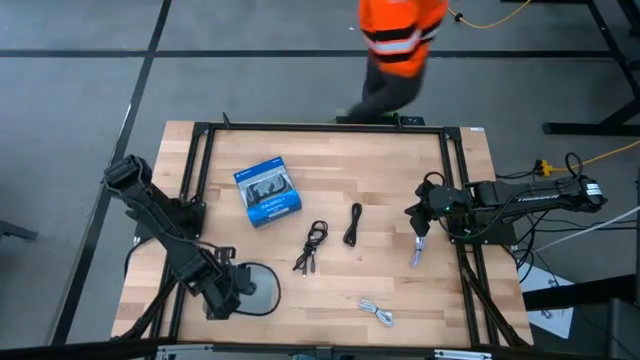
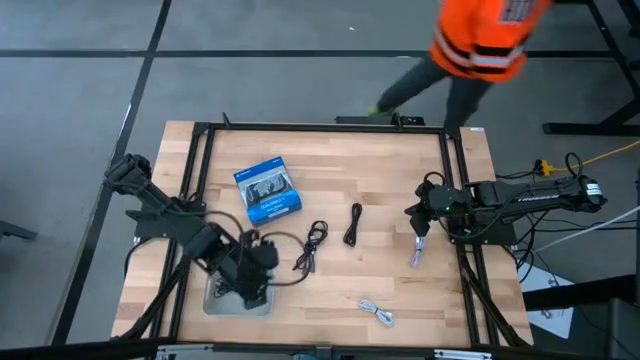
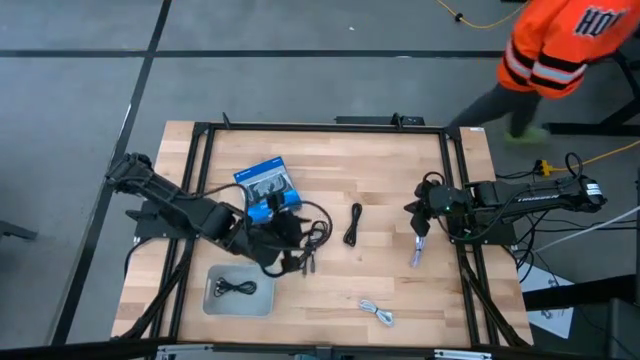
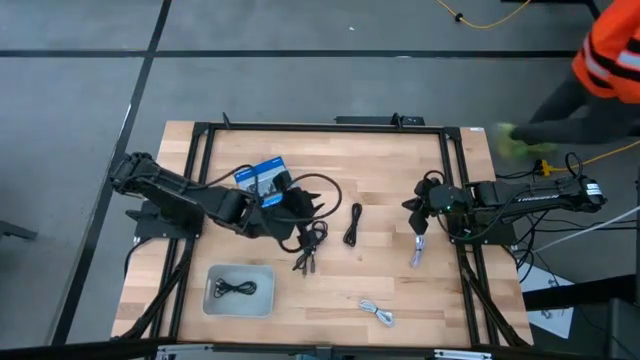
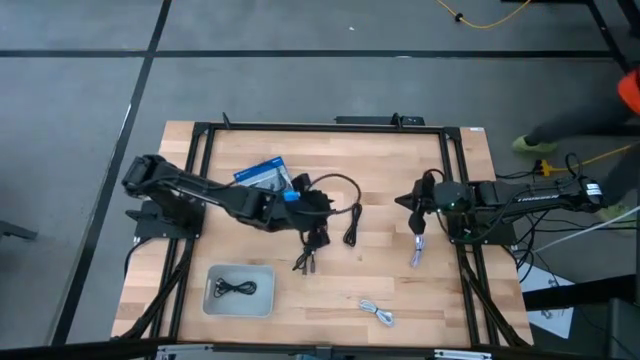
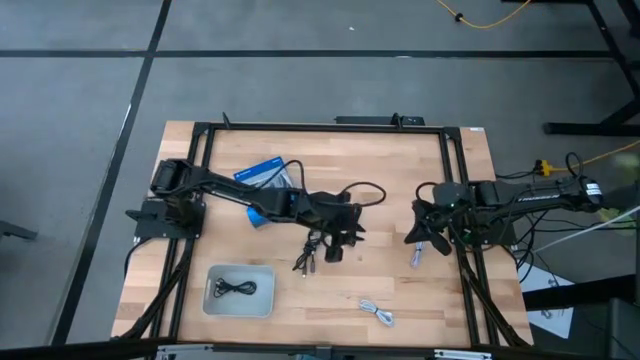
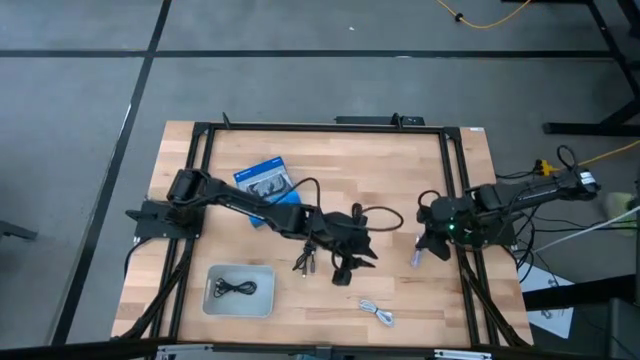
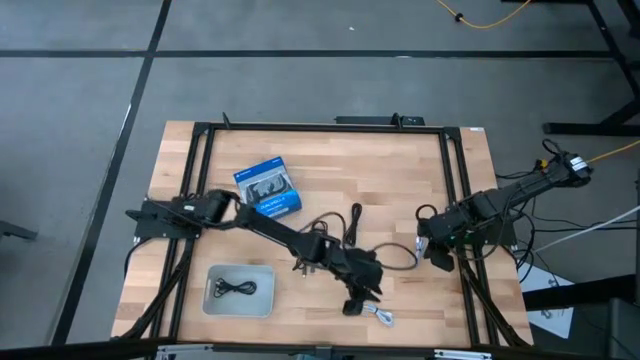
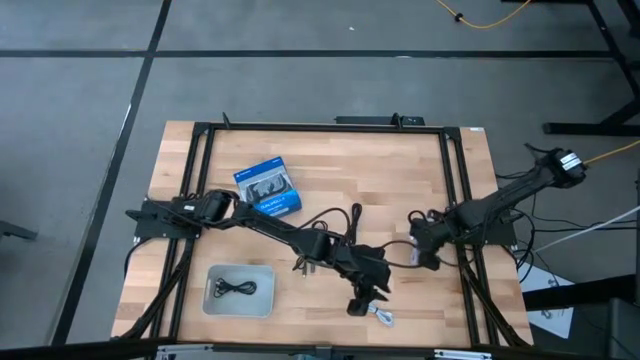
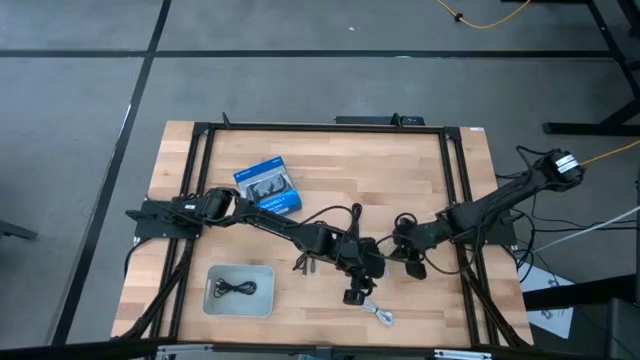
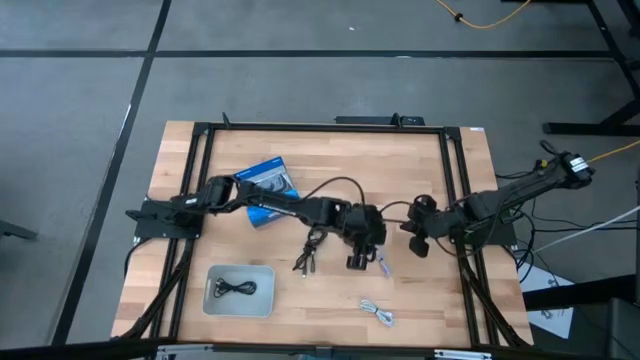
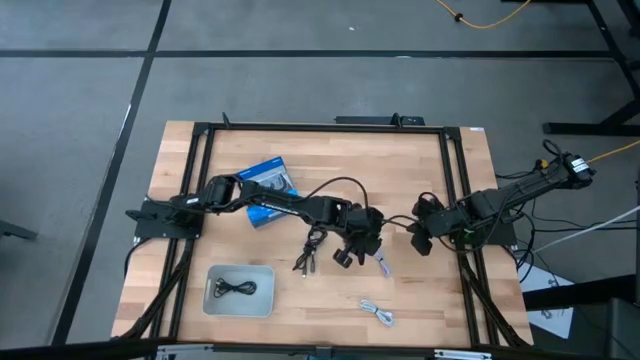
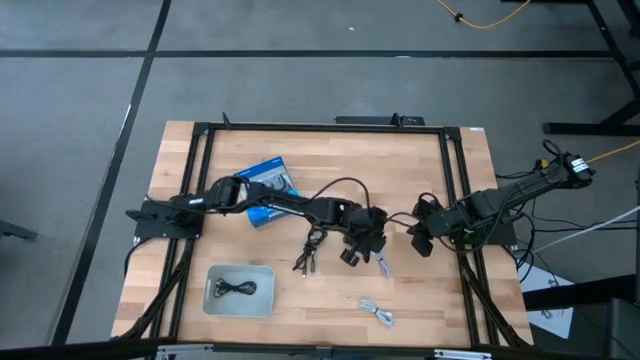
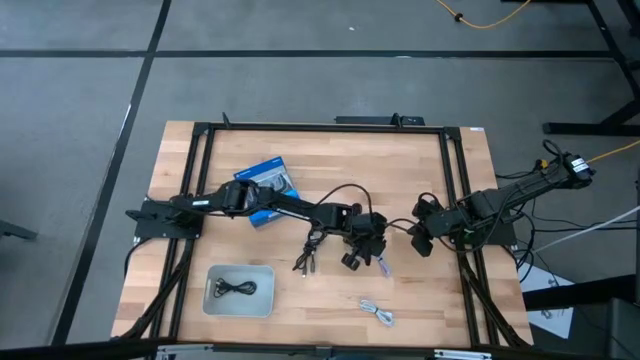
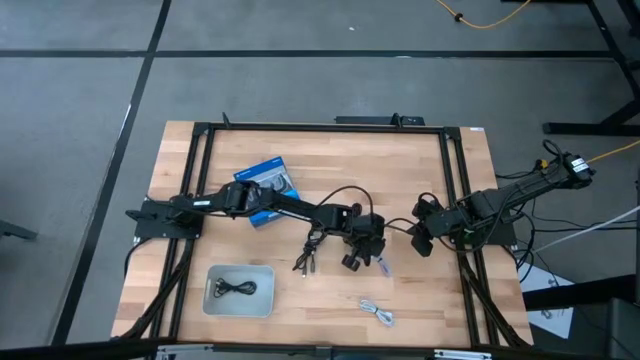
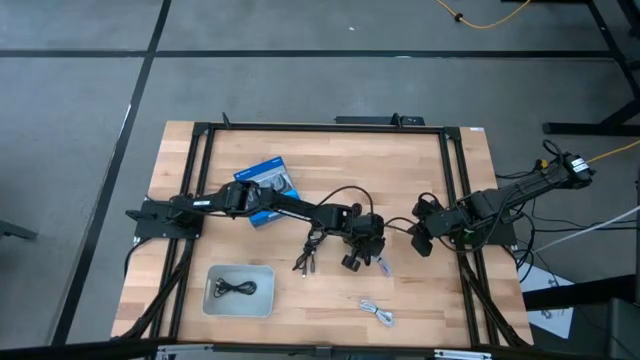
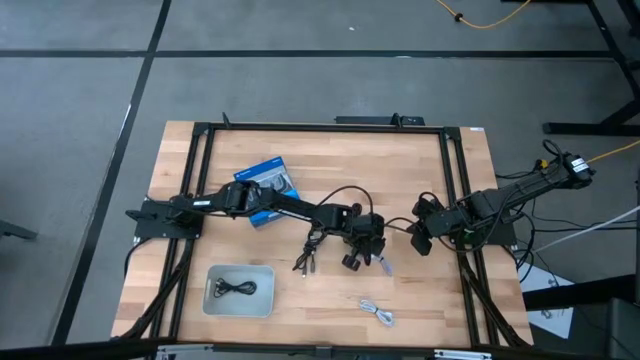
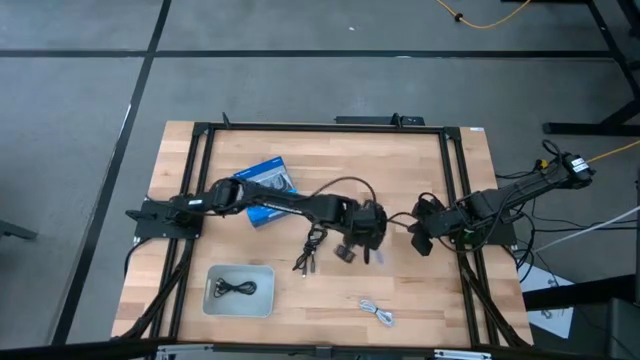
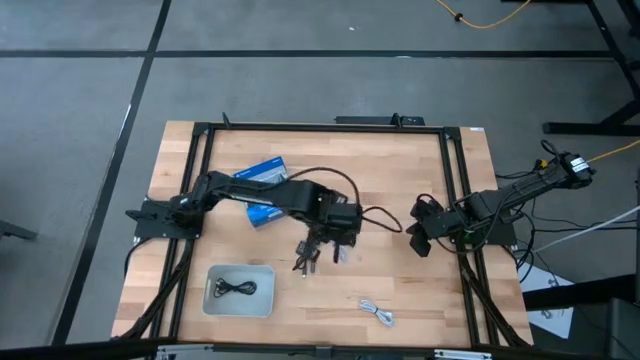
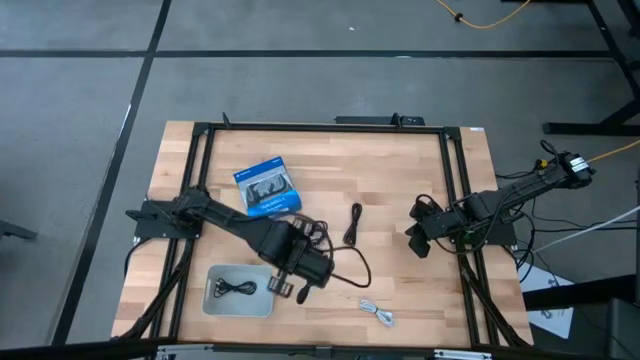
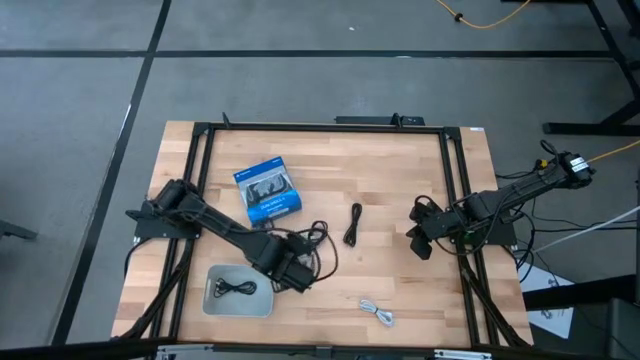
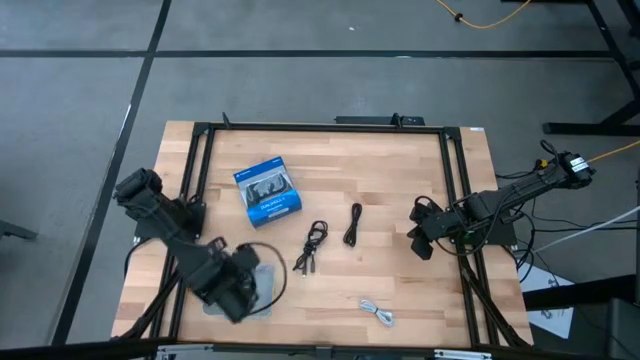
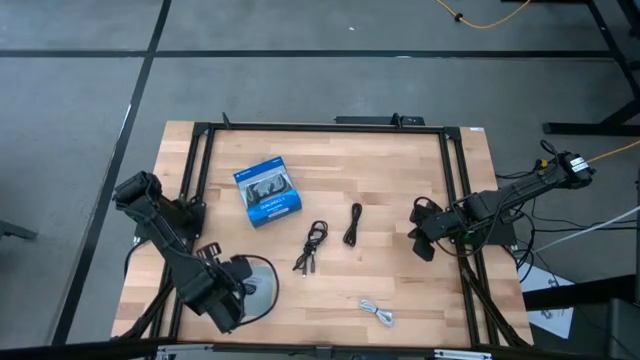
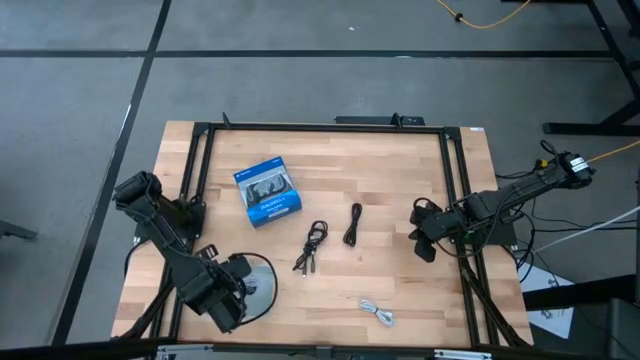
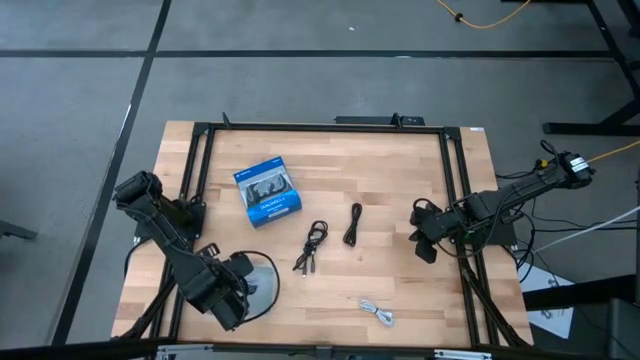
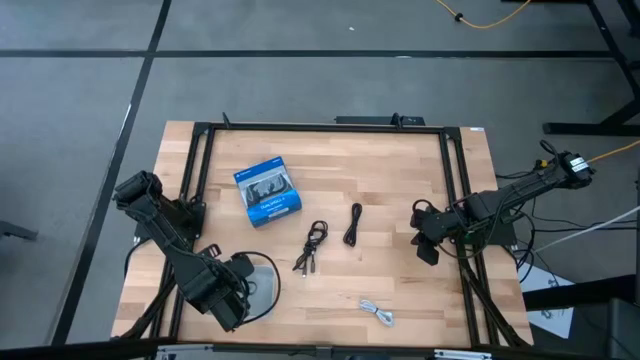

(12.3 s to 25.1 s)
Task: Pick and place USB-C Cables
Put the purple usb cable into the white bin

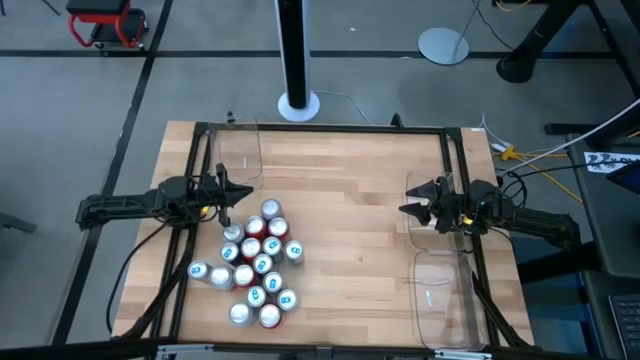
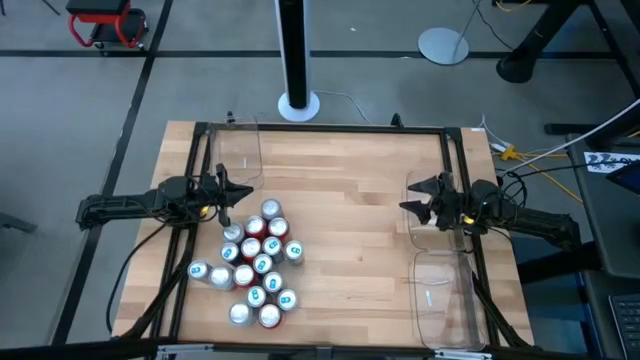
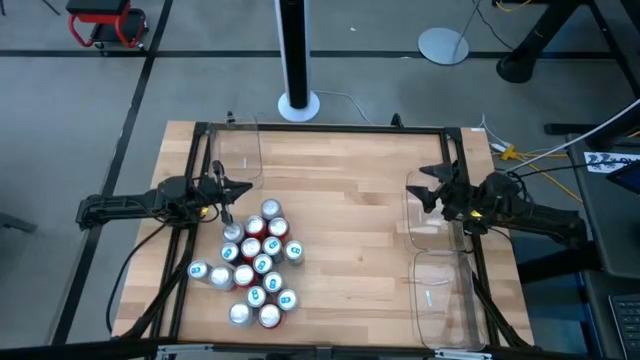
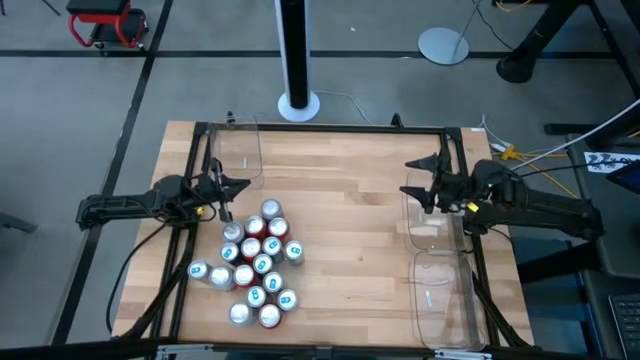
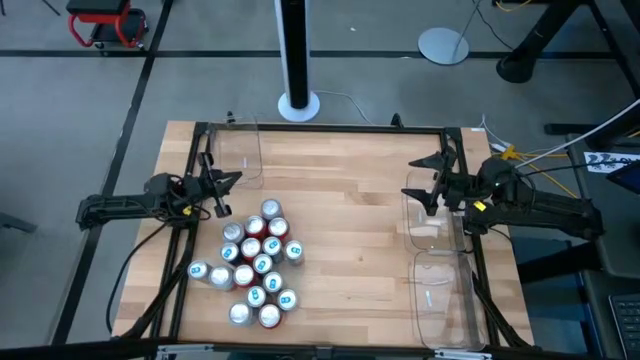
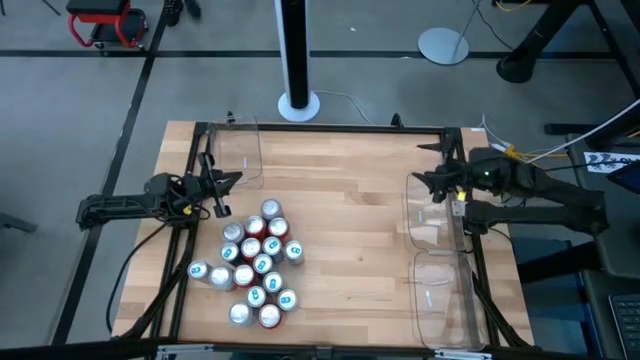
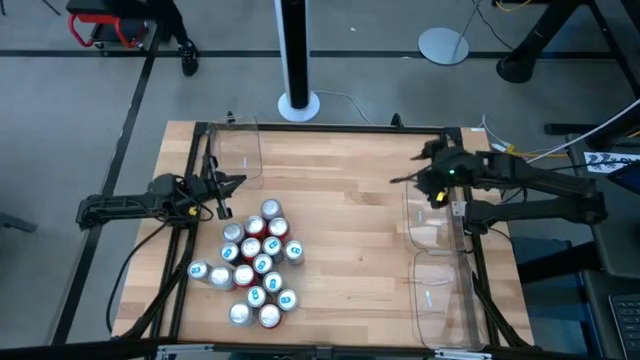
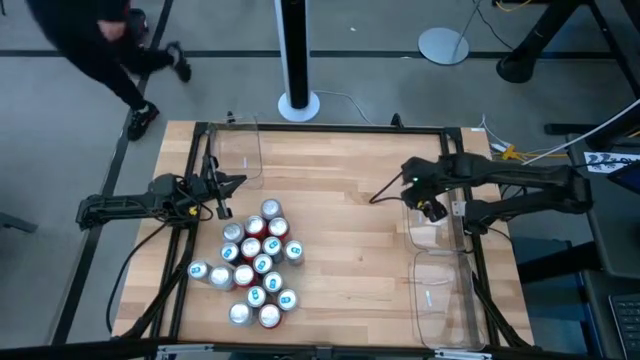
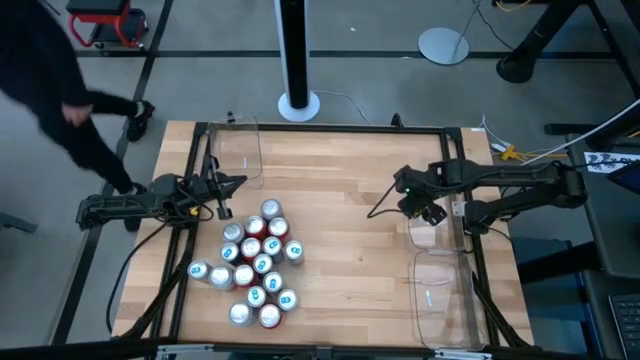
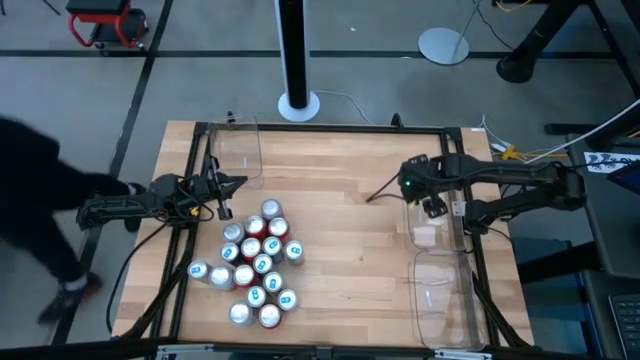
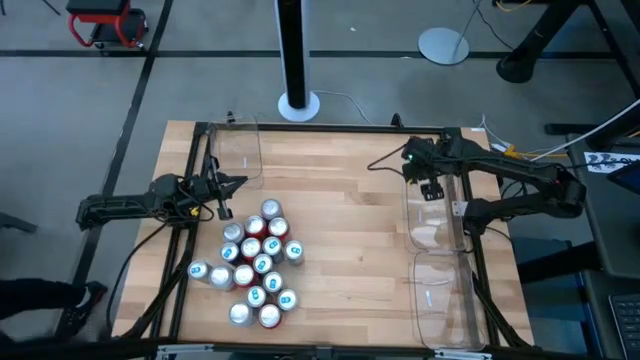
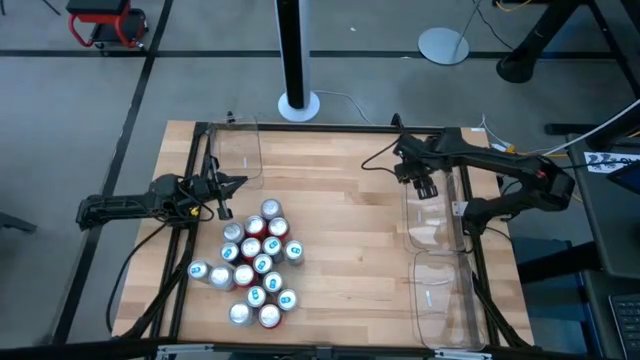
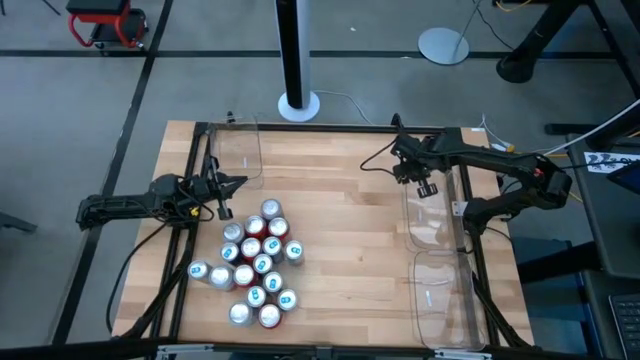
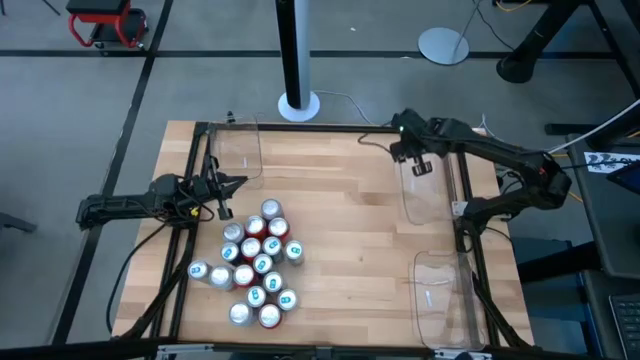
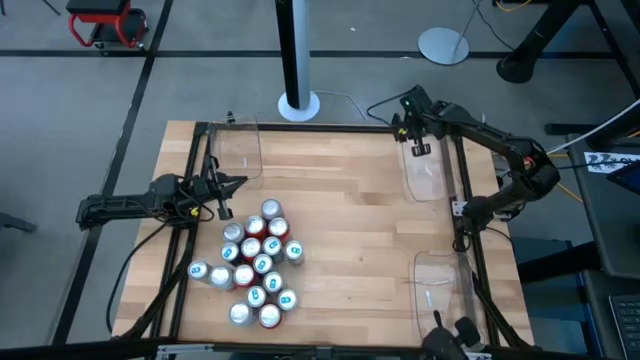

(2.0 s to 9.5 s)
Task: Sort soda cans
Move the transparent bin from the middle right to the top right on the table
